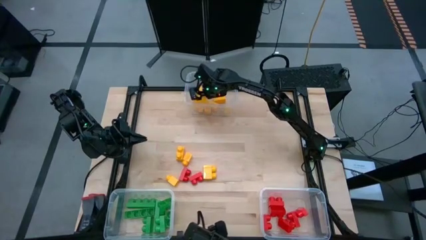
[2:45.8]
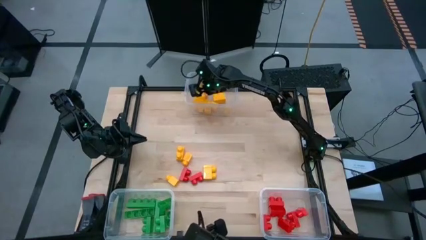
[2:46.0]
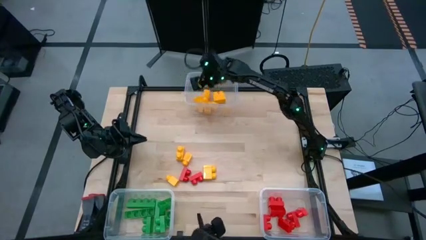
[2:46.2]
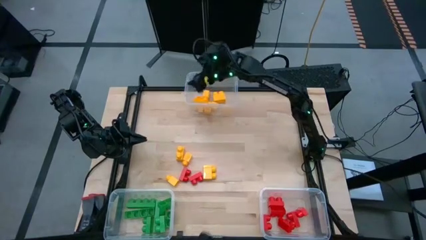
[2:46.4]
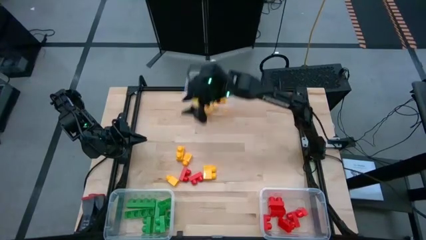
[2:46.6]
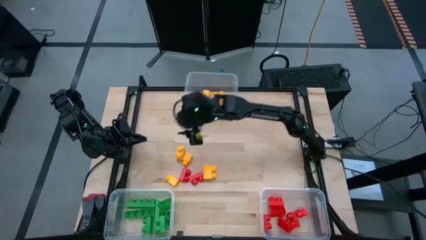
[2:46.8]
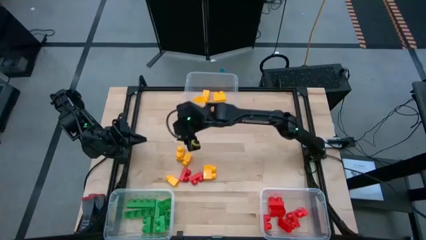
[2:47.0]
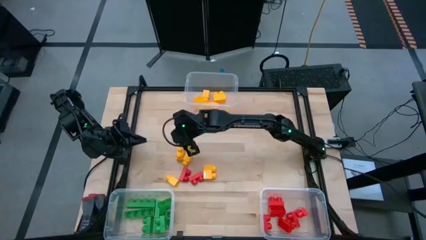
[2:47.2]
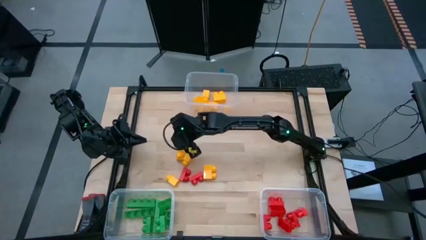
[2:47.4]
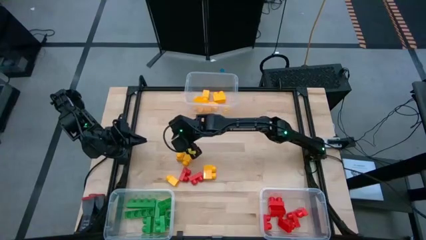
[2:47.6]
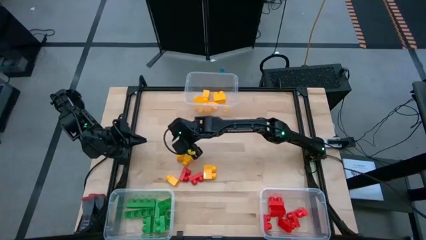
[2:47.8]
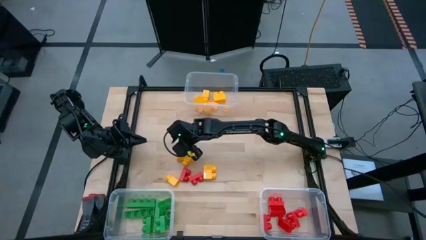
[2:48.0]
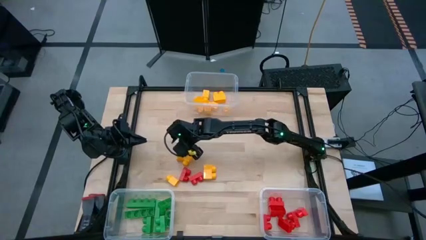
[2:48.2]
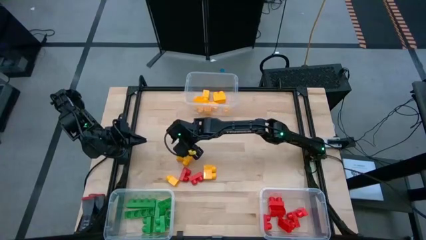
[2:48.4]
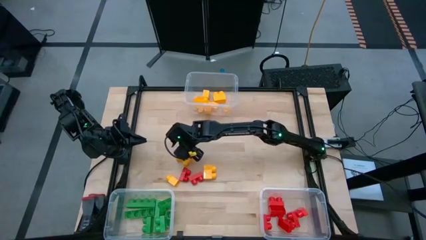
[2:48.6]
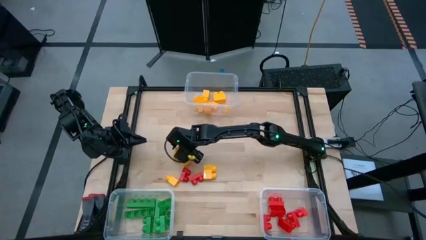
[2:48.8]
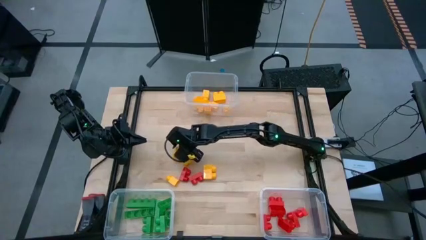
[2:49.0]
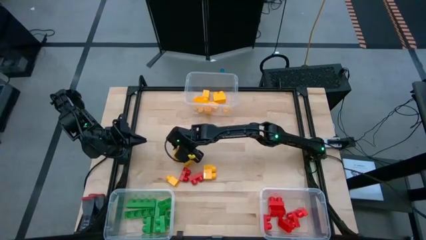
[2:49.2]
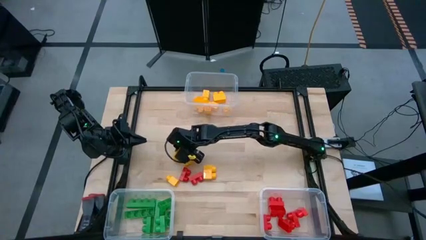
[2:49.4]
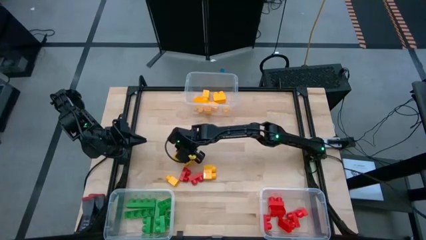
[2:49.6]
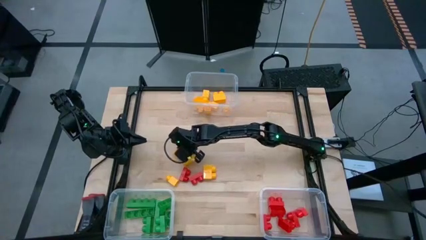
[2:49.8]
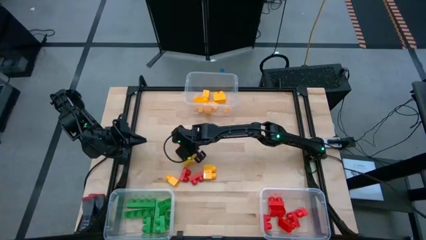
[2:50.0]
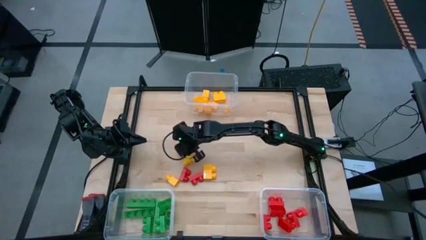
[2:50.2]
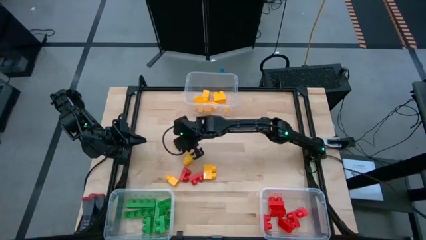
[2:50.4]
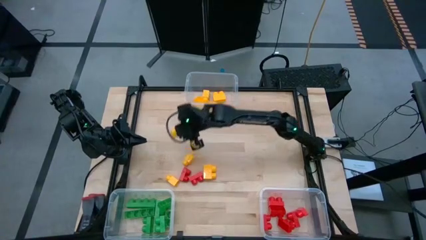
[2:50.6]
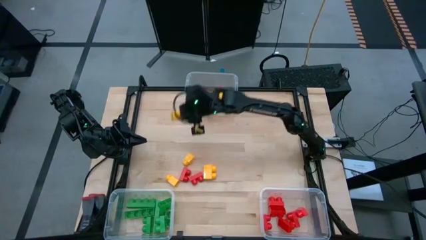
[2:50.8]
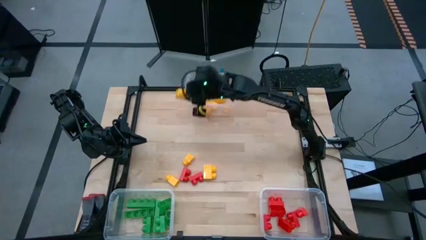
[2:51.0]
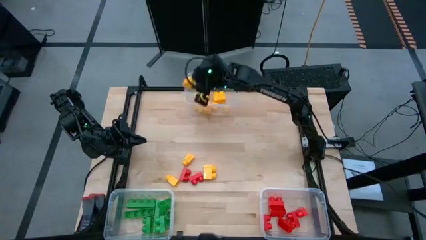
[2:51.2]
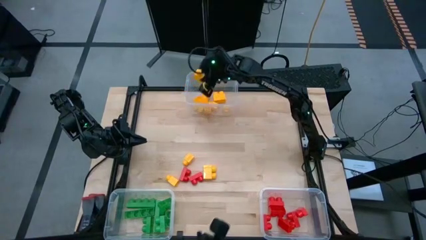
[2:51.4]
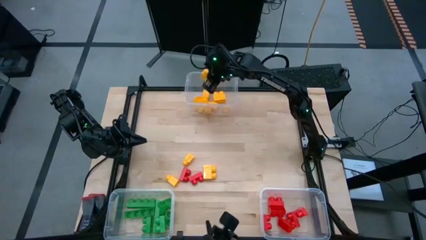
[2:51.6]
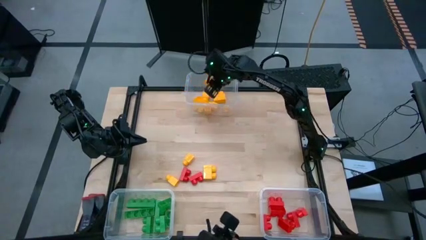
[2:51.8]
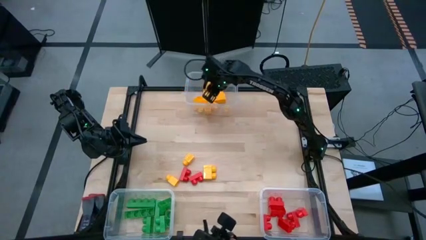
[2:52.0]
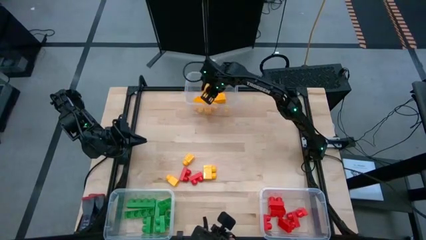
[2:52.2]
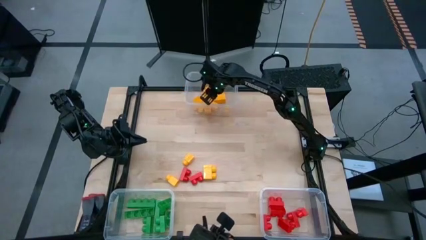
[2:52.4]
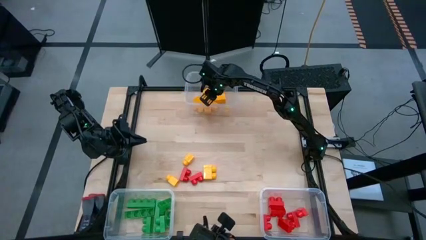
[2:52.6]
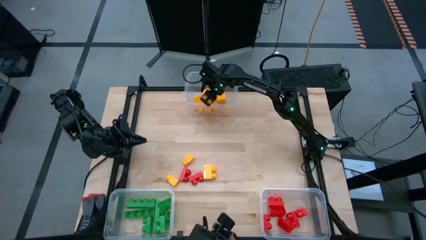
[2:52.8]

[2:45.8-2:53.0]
Task: Sort blocks
Put the yellow game piece into the top transparent bin

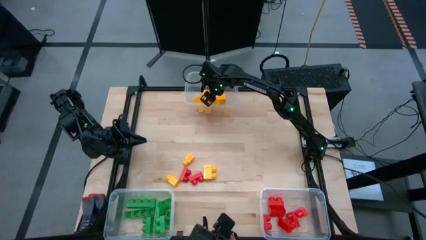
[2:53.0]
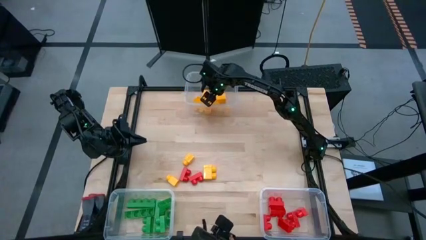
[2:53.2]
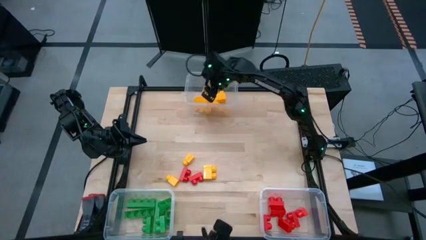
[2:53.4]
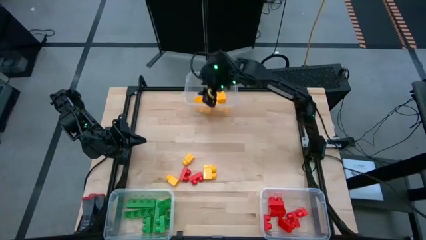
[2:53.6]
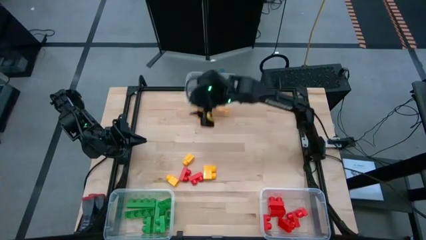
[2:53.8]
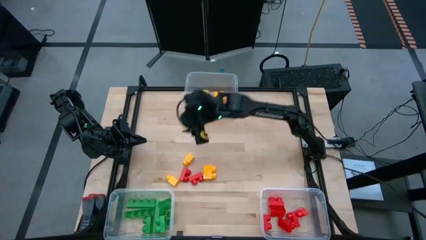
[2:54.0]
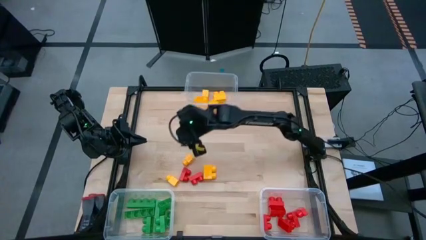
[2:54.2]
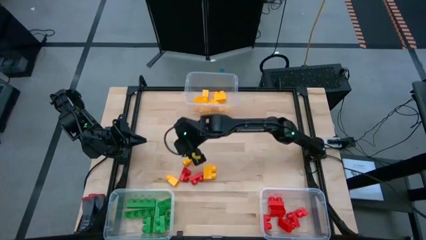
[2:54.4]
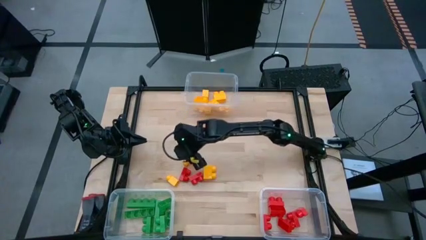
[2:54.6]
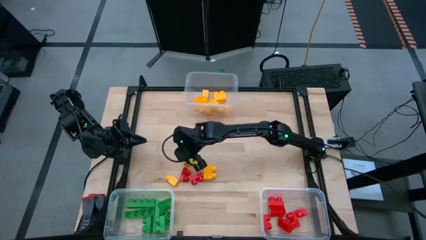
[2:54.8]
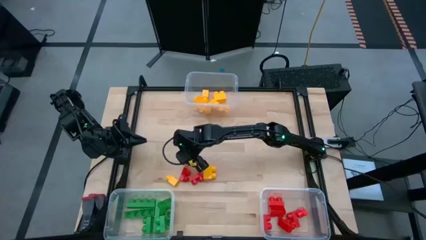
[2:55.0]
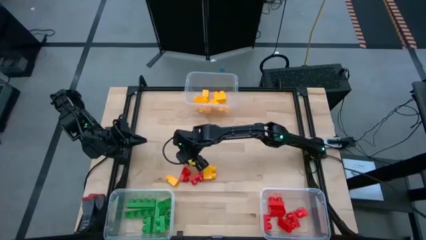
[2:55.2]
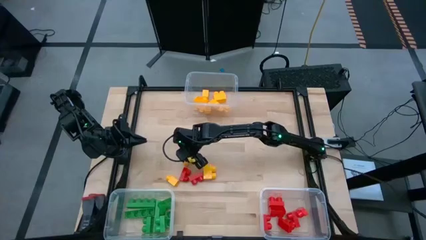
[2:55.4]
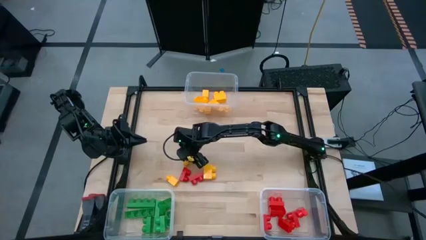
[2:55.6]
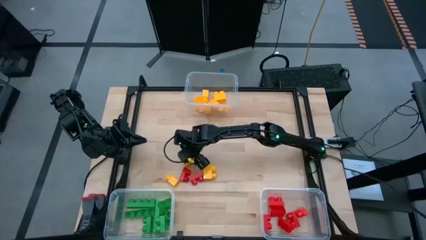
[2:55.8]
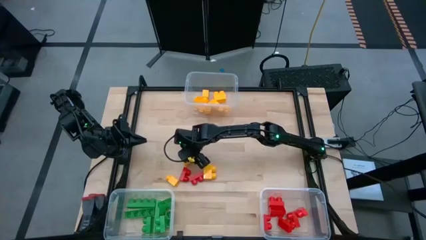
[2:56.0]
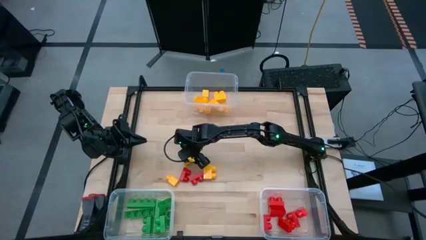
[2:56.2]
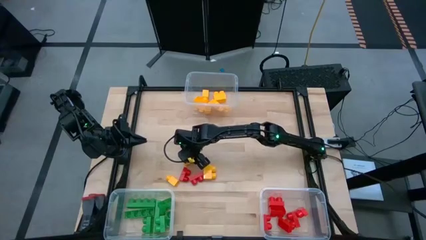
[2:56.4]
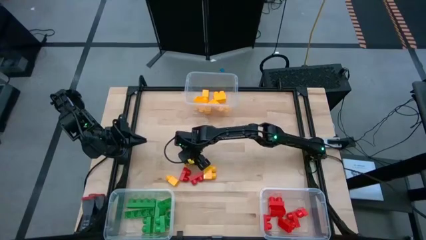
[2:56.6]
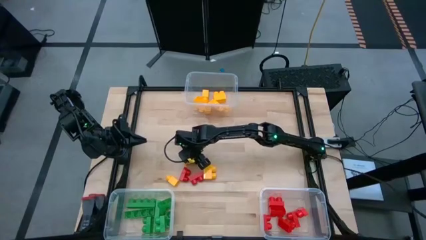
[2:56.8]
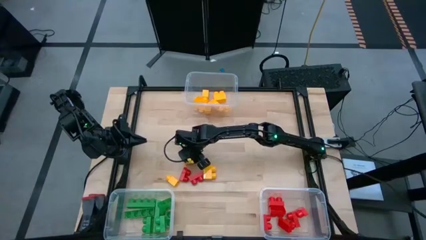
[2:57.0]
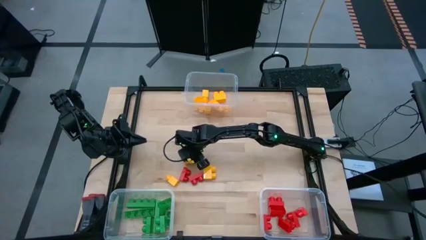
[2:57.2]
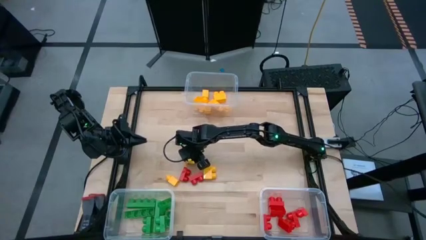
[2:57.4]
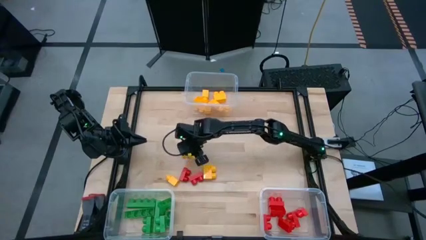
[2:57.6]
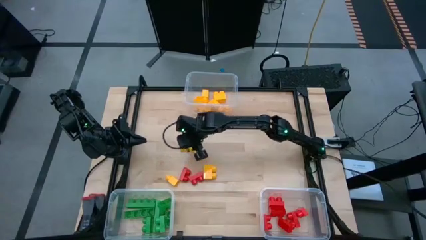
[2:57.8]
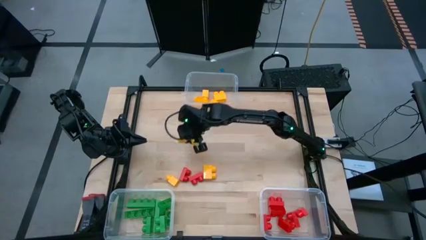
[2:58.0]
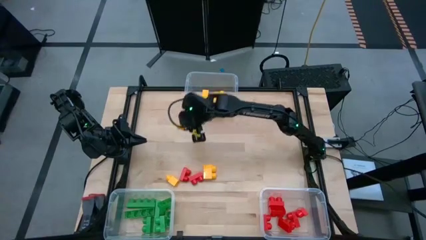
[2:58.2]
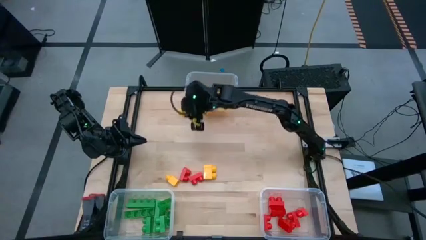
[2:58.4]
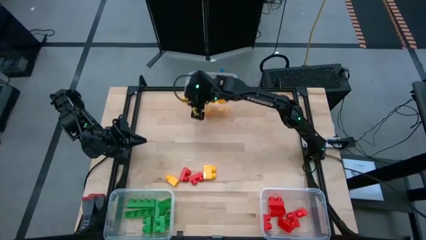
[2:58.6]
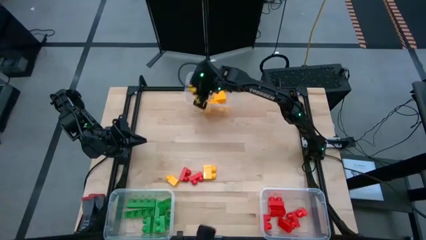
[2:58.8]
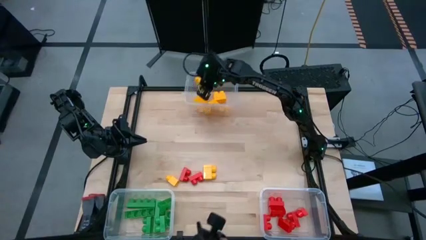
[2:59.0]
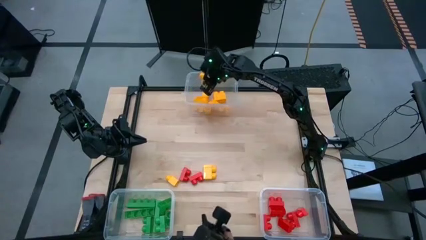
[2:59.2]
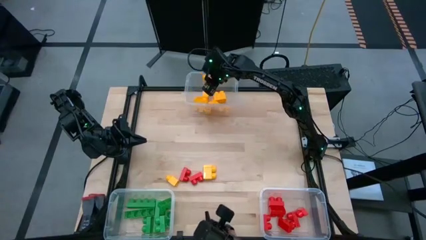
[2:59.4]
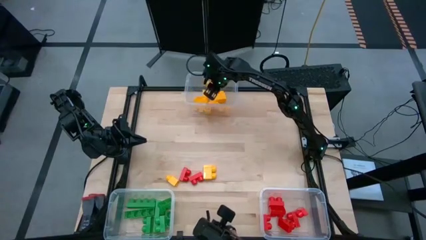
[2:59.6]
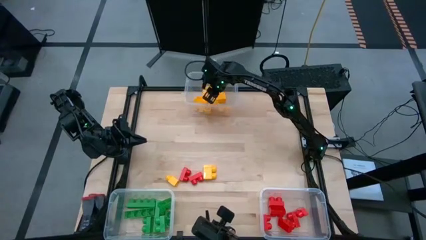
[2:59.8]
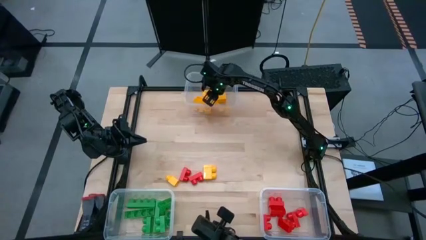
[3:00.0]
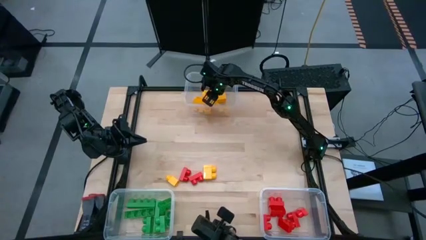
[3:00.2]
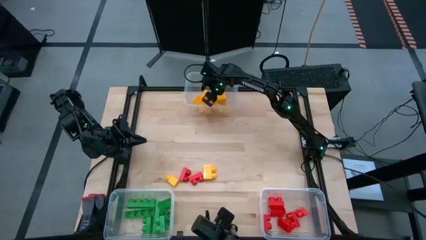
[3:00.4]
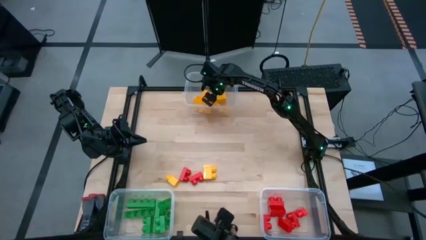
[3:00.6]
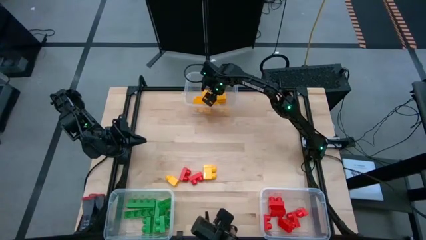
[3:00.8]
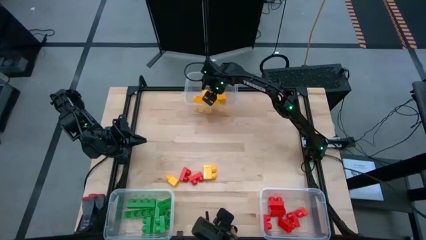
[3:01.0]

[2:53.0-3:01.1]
Put the yellow game piece into the top transparent bin

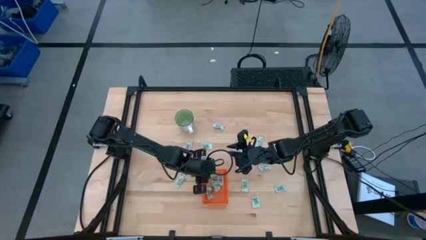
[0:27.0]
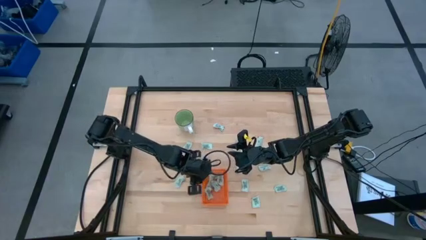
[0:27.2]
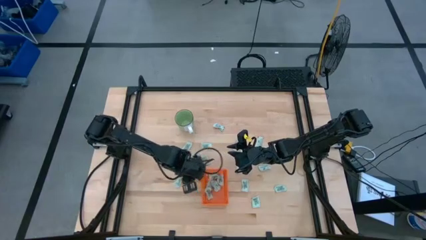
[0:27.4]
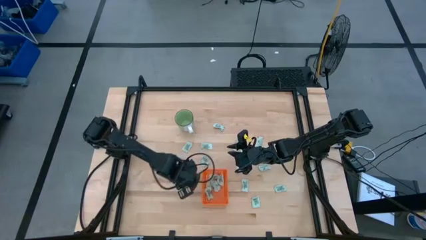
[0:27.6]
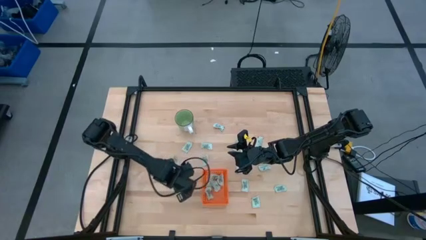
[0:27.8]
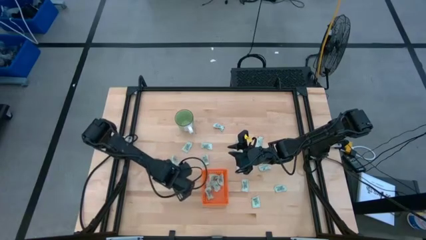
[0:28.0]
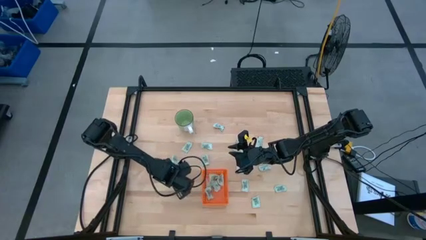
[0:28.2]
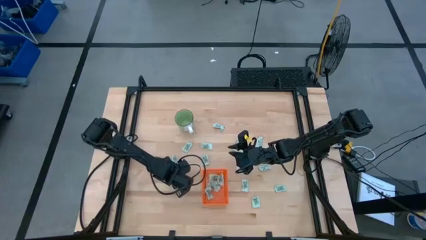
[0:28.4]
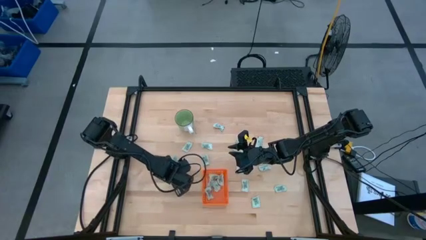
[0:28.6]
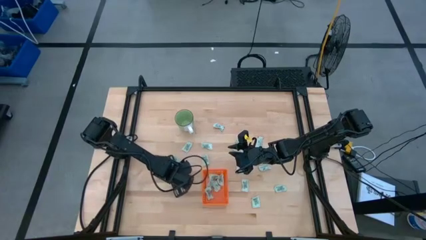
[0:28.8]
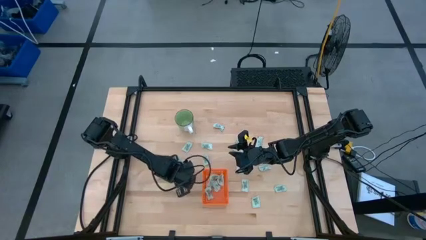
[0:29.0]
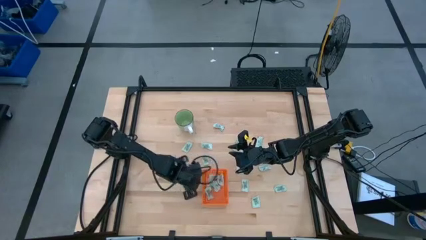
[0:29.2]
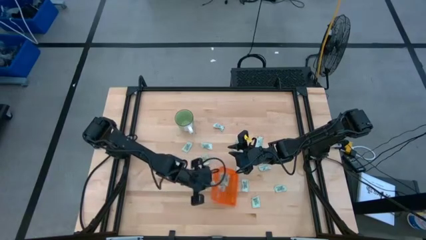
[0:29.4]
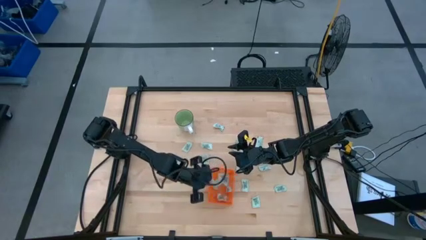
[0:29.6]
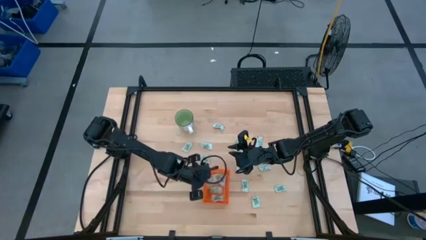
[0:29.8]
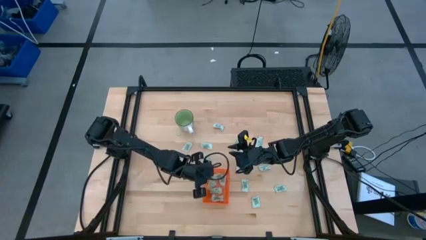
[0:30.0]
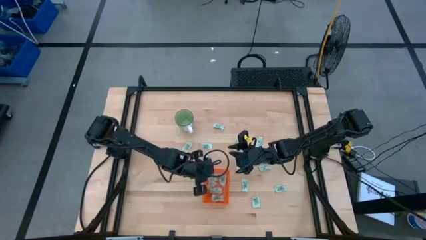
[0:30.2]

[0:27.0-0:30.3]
Task: Pick and place Stevia / Truvia into bins
Put the stevia packet into the orange basket
